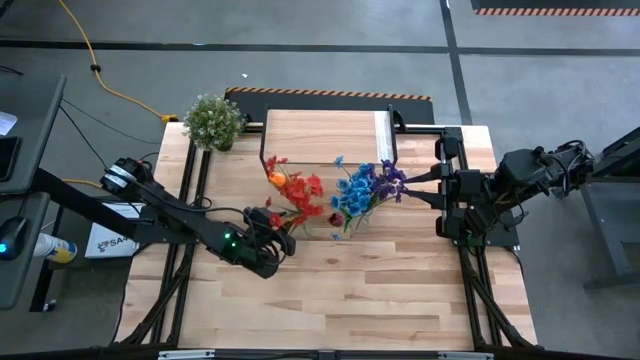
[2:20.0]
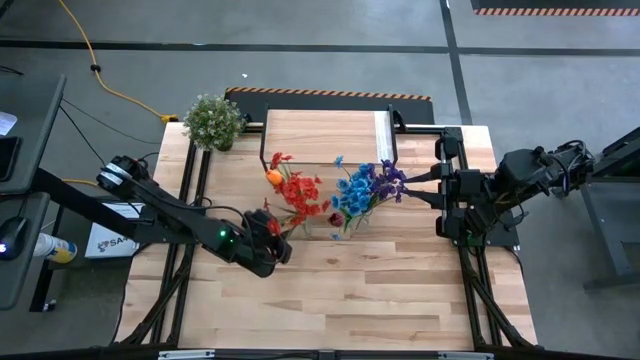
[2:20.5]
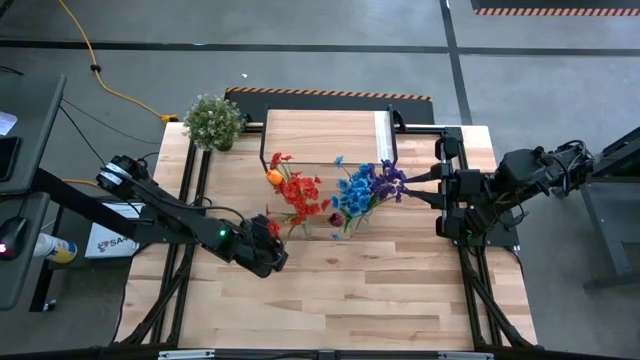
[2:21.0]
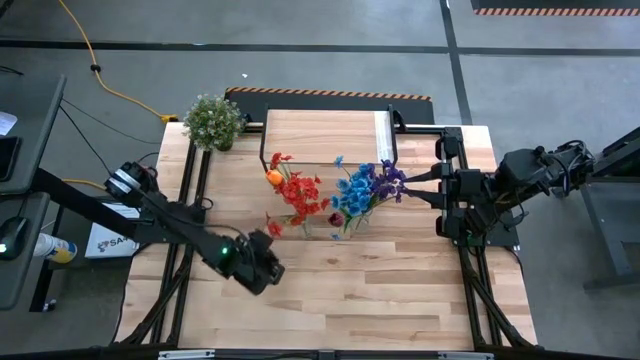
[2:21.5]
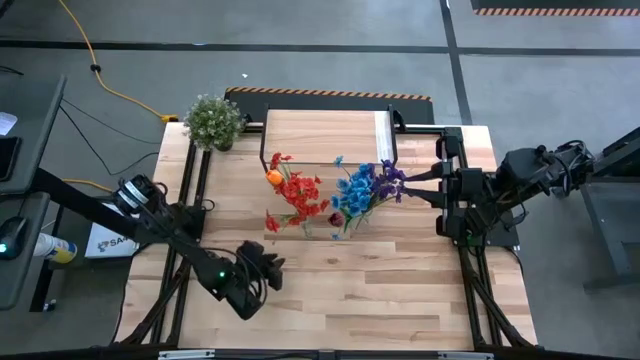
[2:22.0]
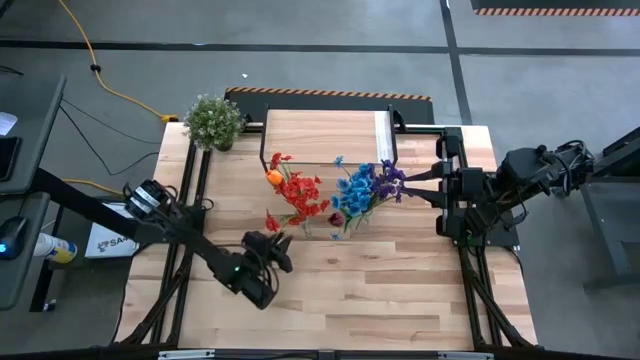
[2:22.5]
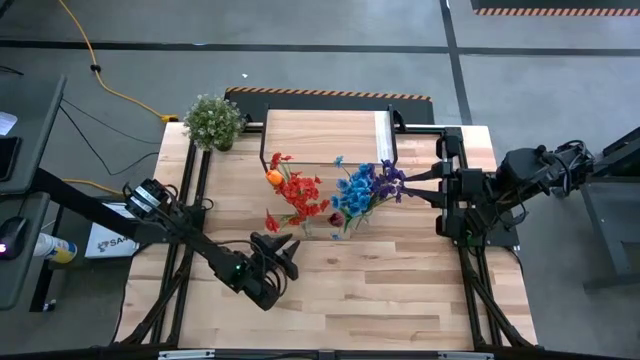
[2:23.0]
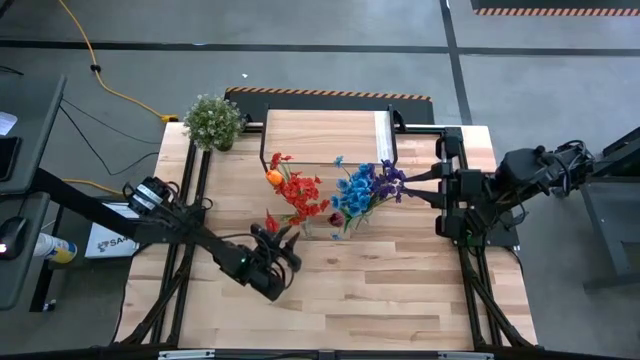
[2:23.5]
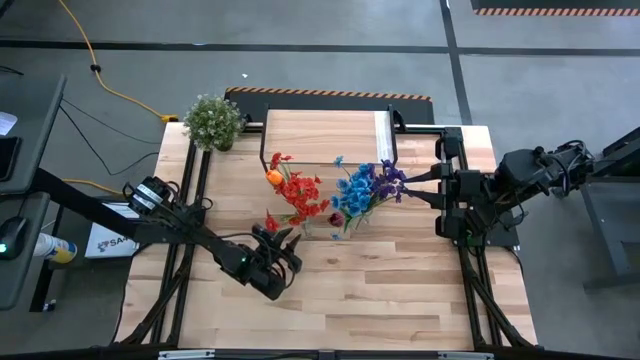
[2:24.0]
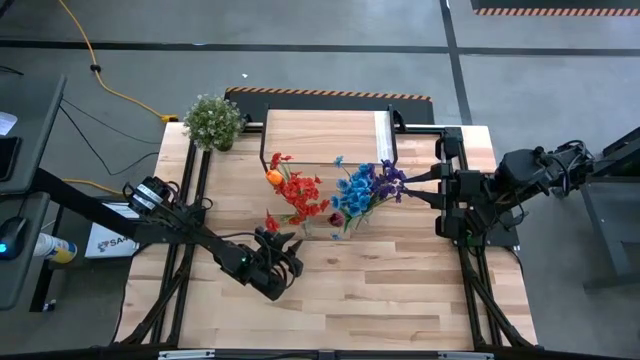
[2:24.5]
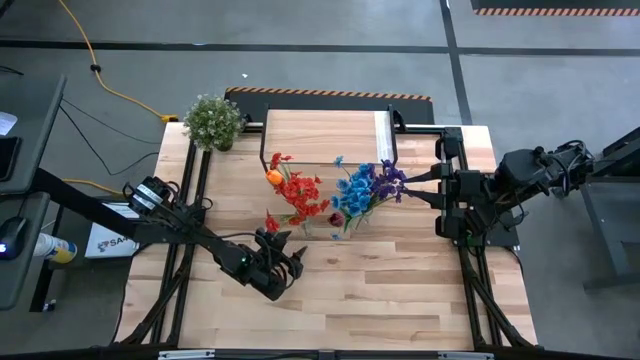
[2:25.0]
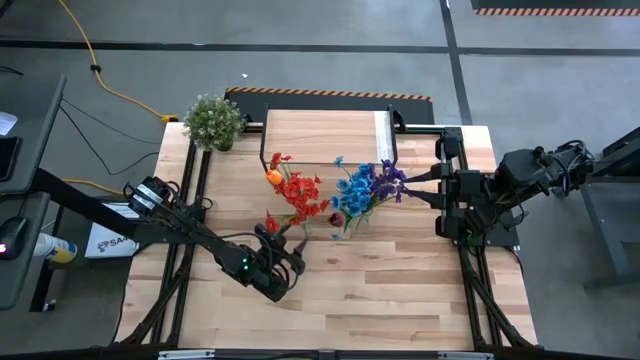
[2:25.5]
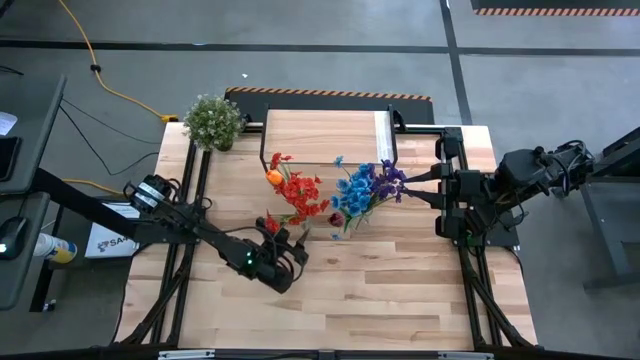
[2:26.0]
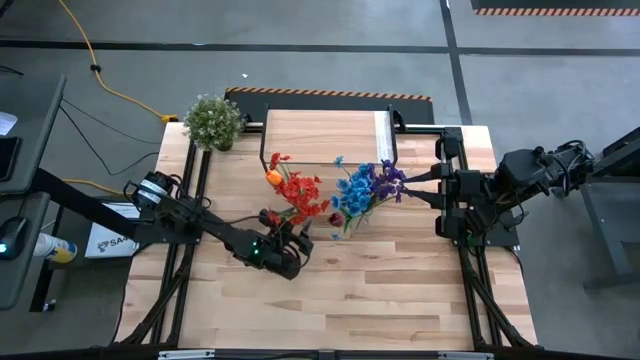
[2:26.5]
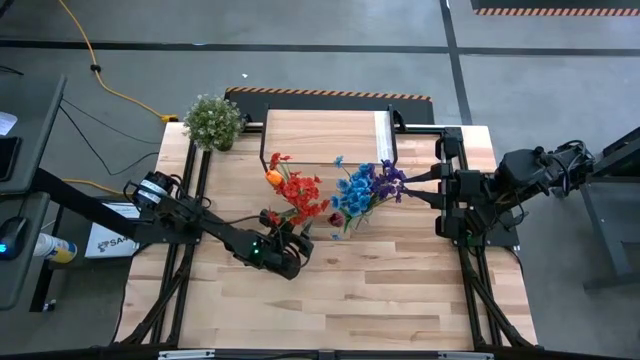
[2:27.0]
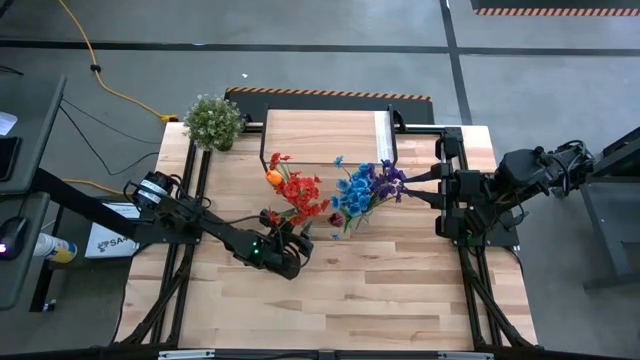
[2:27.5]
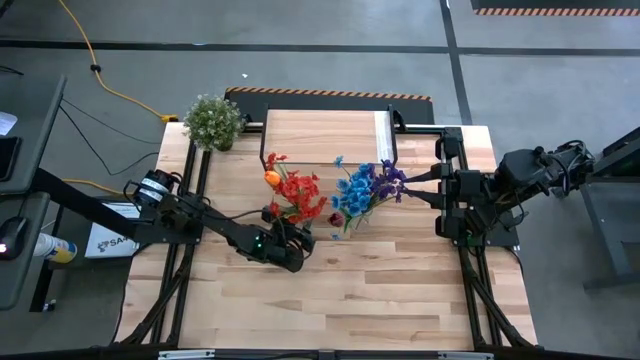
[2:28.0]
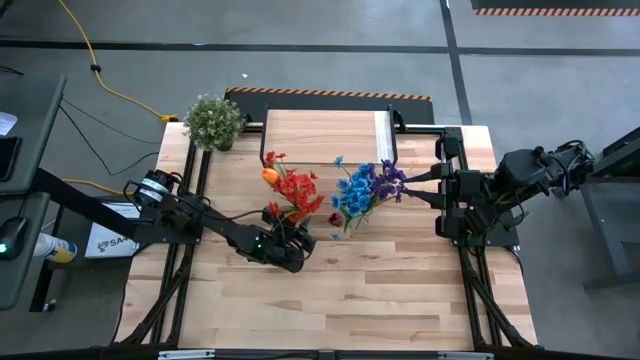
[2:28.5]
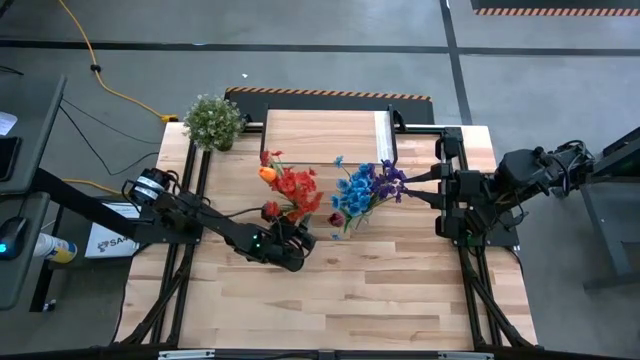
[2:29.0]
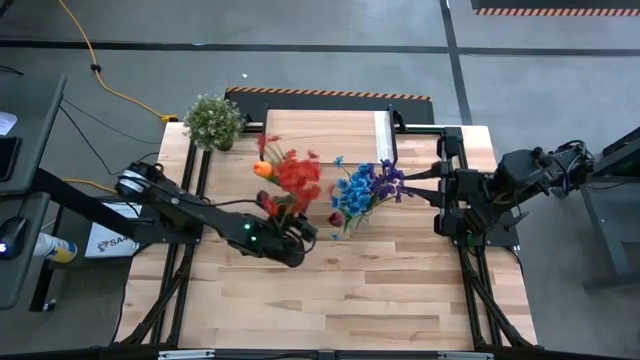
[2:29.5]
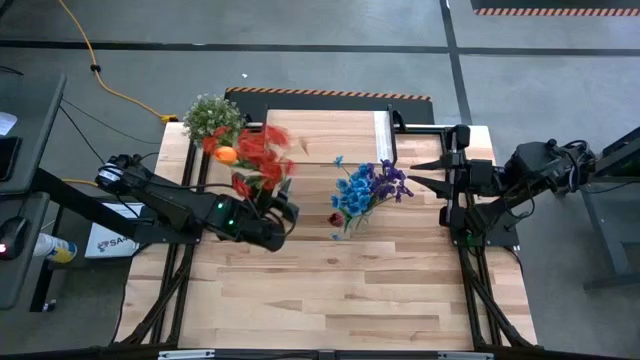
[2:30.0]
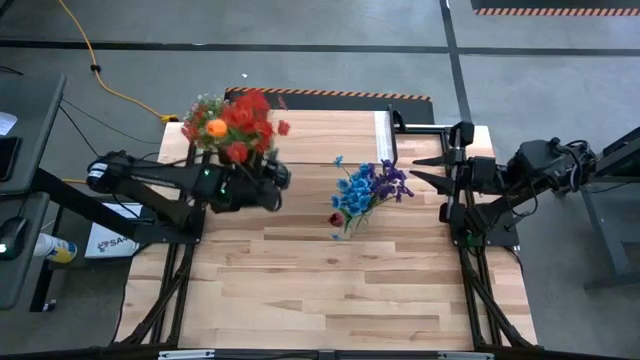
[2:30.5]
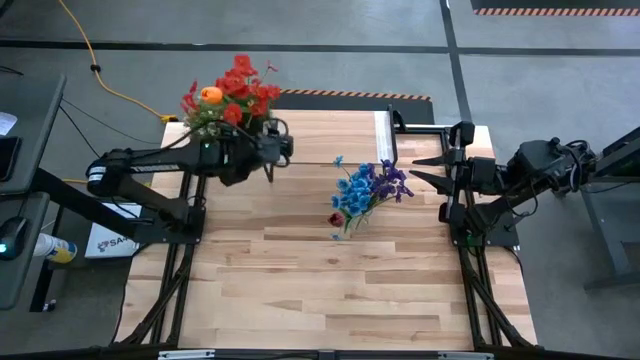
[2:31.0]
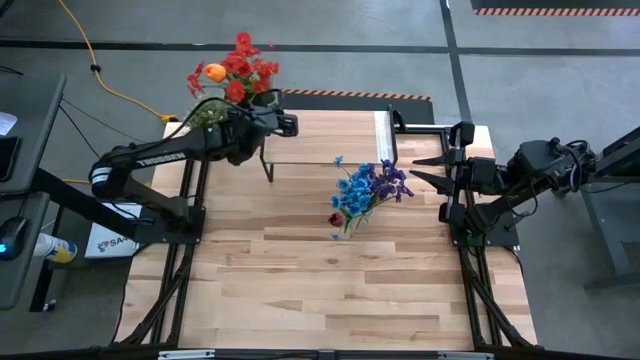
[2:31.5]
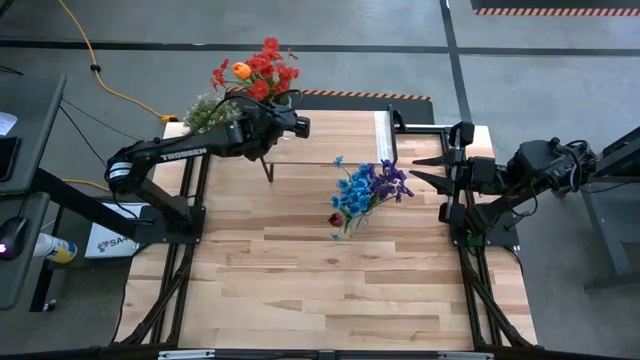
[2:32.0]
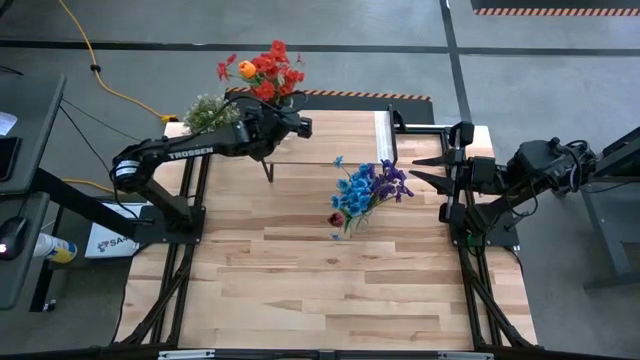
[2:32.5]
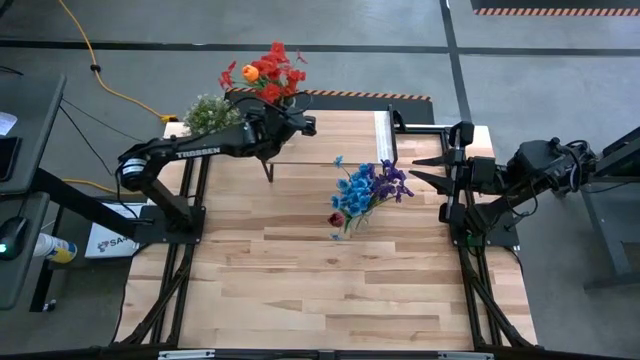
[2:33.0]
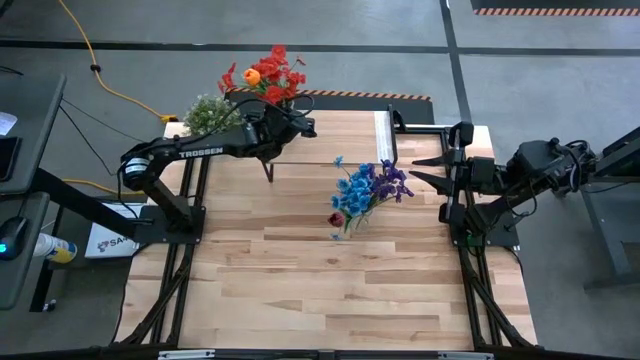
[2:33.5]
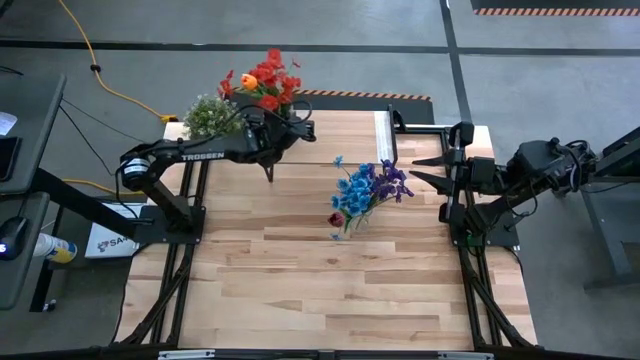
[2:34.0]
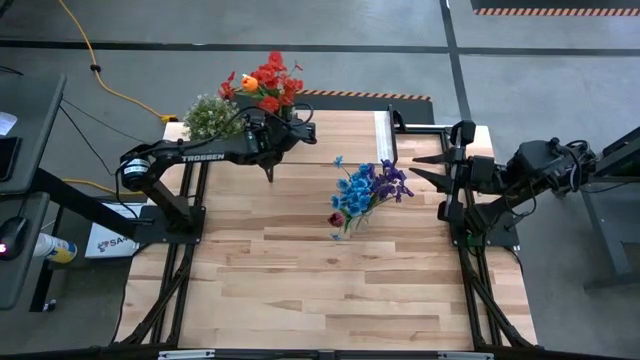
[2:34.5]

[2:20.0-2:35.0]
Task: Pick and place flowers into a vace then onto a shelf
Put the left transparent vase with flowers on the shelf

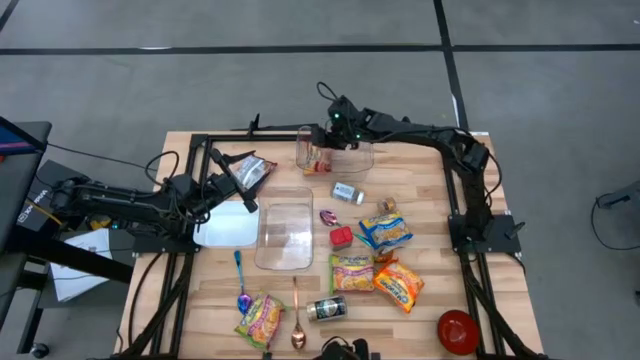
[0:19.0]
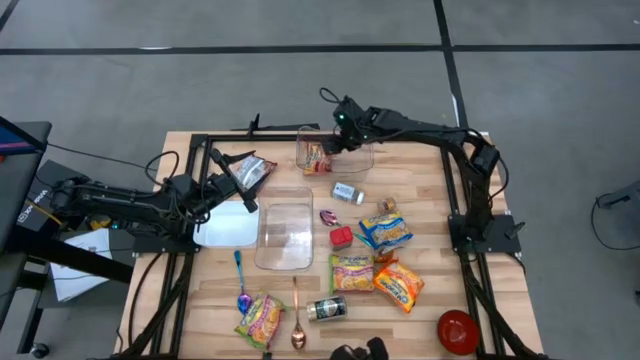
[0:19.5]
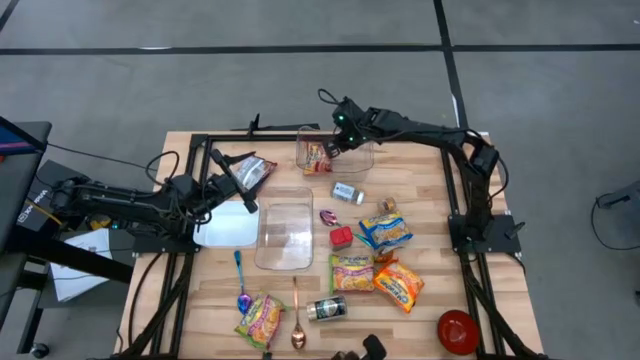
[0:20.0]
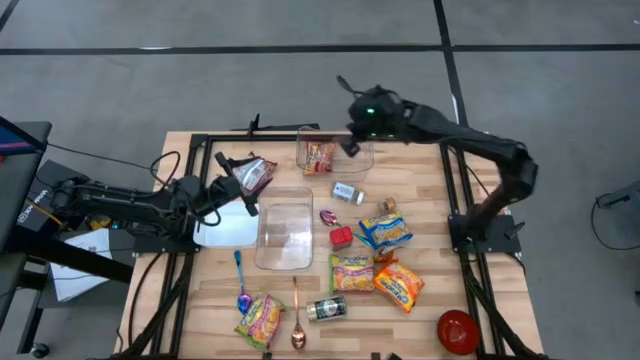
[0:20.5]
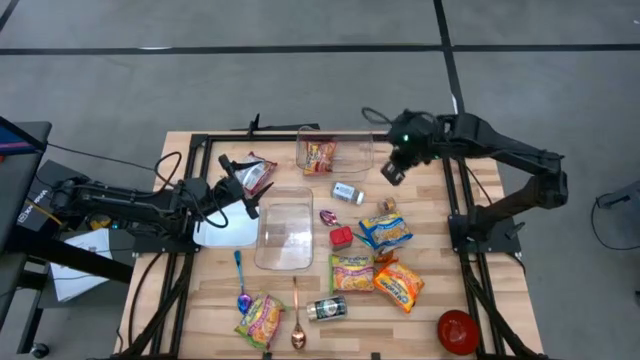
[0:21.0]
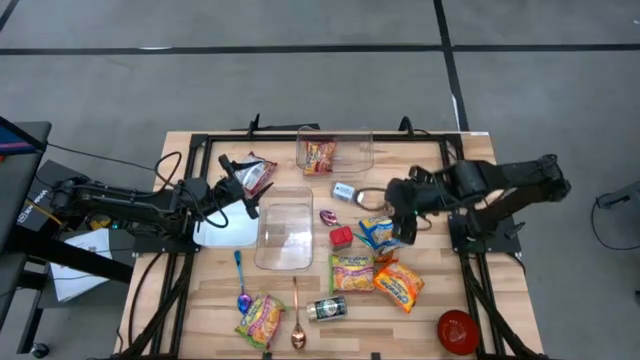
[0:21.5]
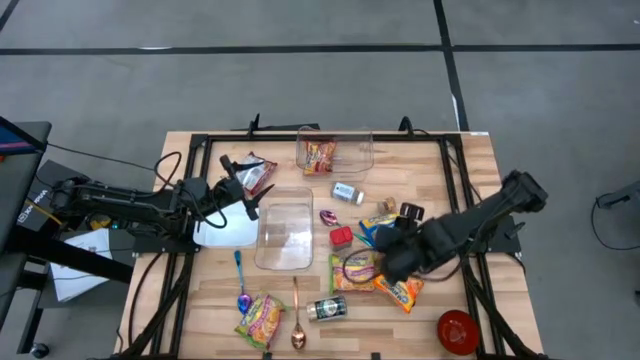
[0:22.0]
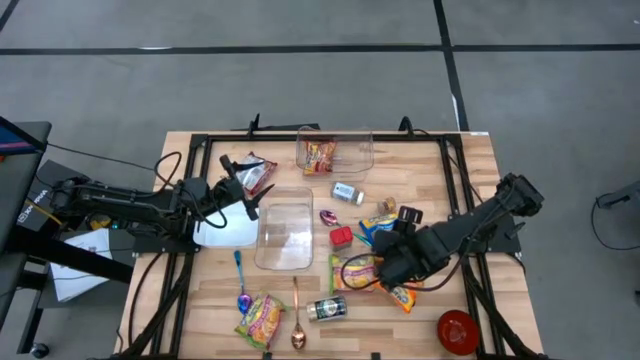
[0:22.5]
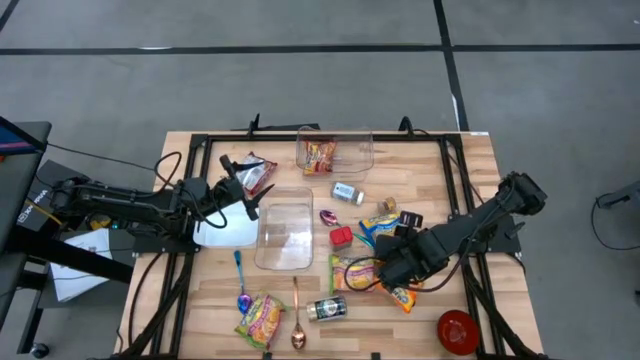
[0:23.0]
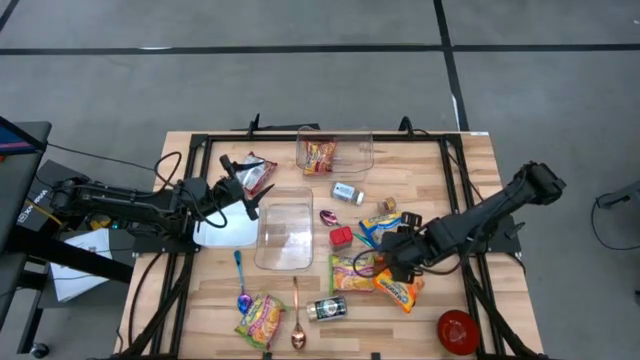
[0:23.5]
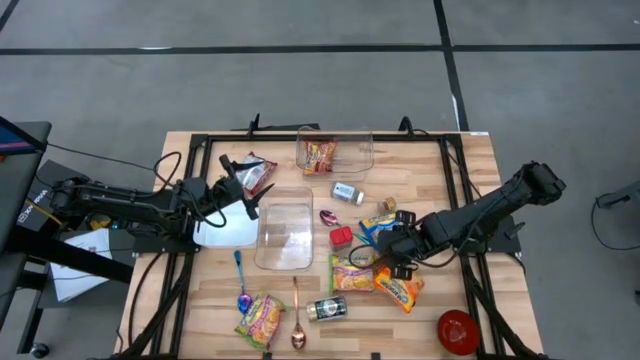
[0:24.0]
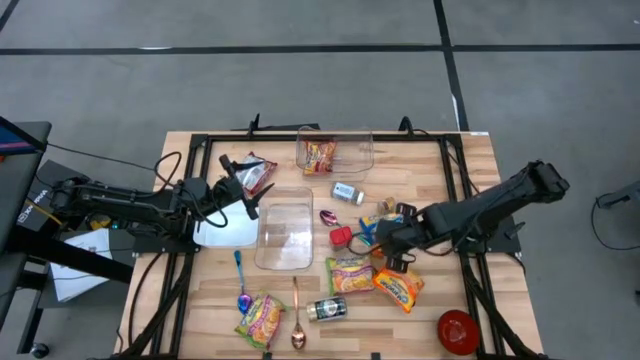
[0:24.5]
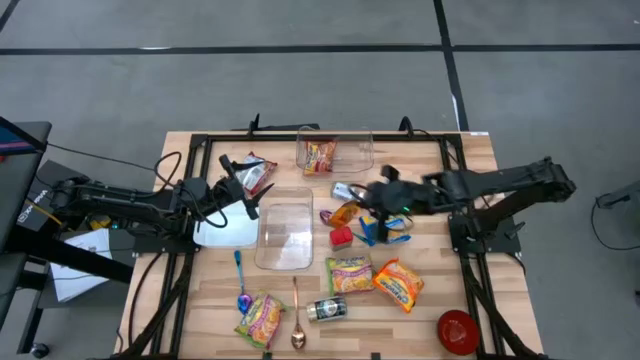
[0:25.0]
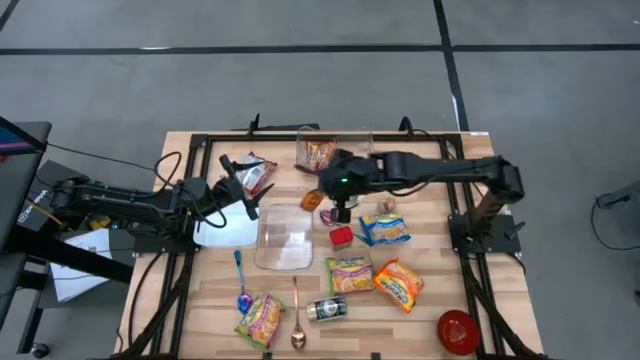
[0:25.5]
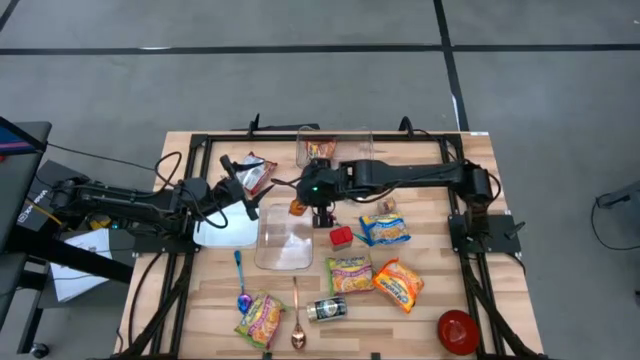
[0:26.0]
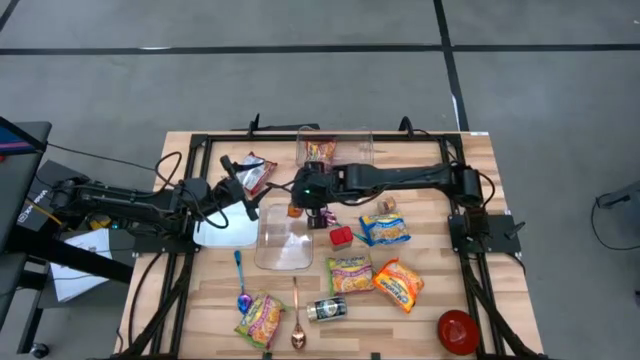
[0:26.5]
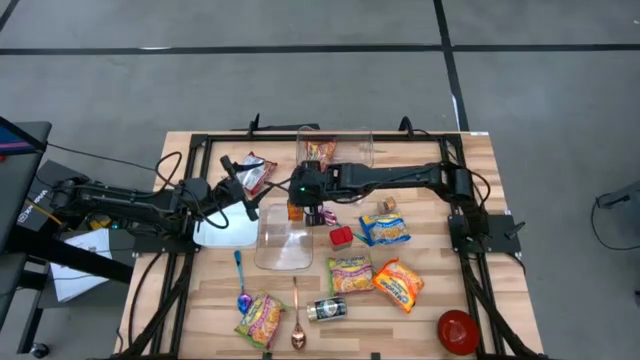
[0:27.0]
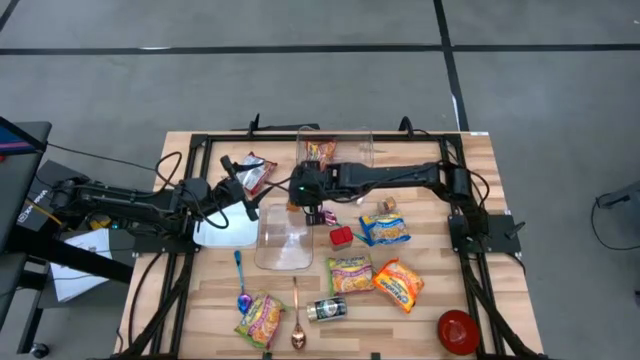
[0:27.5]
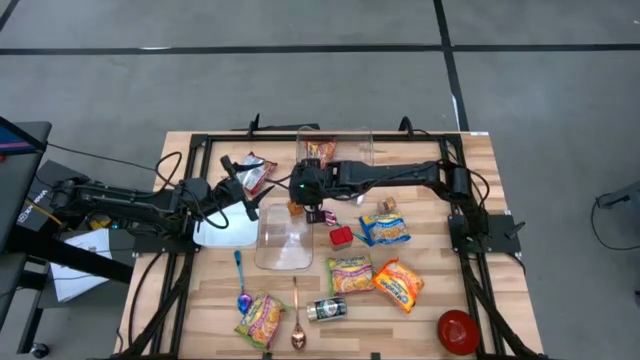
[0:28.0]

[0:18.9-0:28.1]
Task: Pick & Place Food Item
Put the orange seasoning pack into the bottom transparent bin
